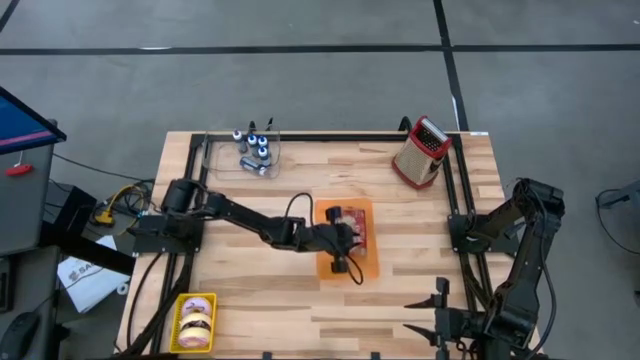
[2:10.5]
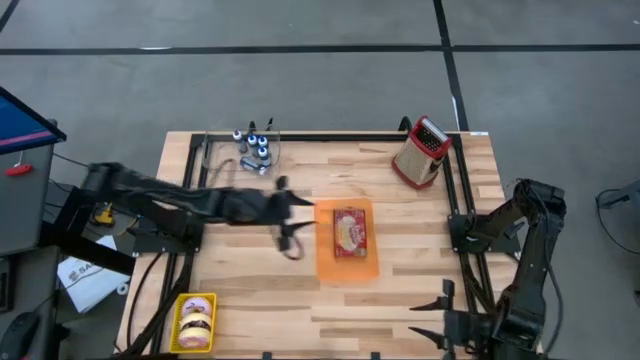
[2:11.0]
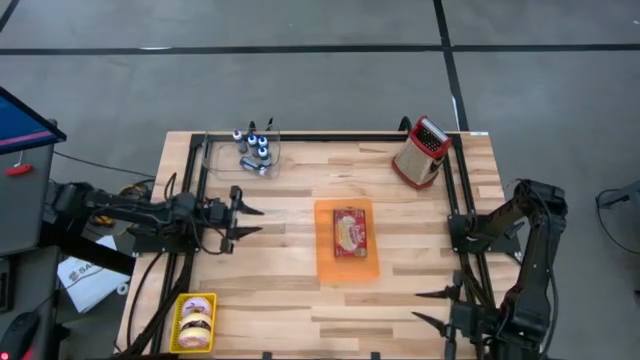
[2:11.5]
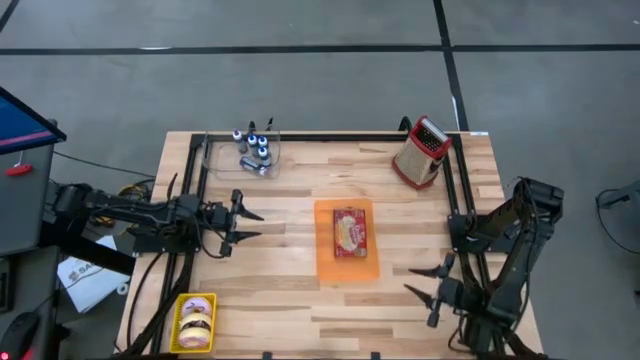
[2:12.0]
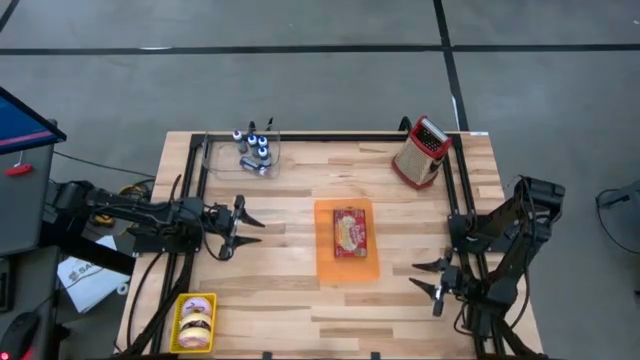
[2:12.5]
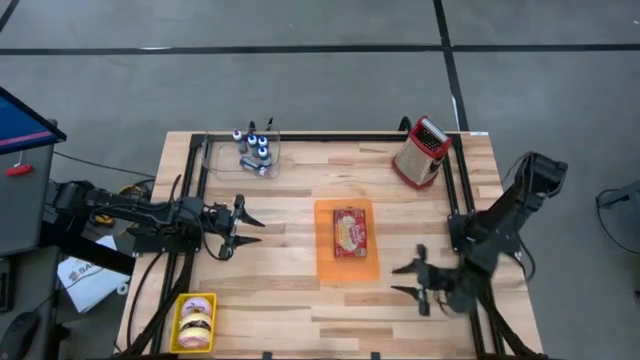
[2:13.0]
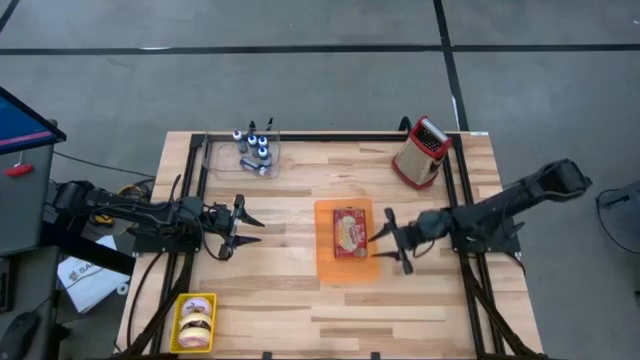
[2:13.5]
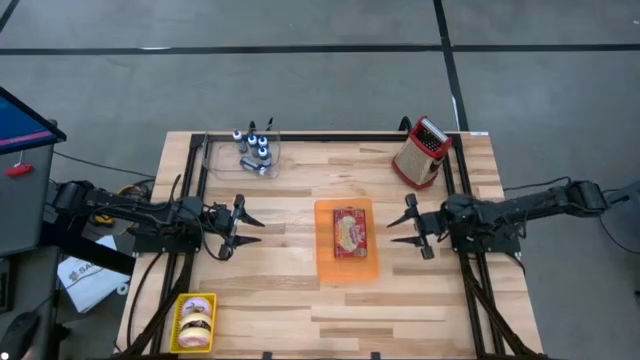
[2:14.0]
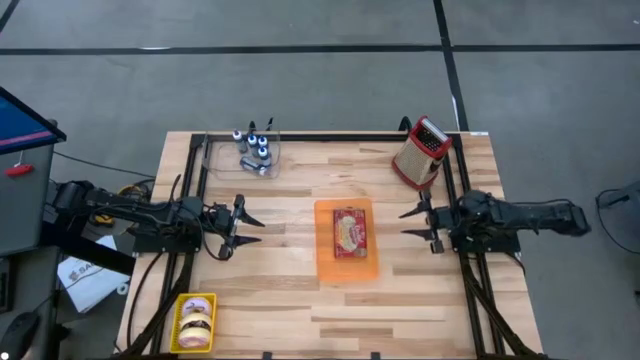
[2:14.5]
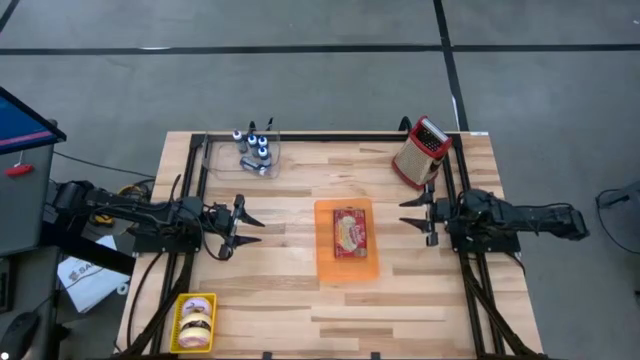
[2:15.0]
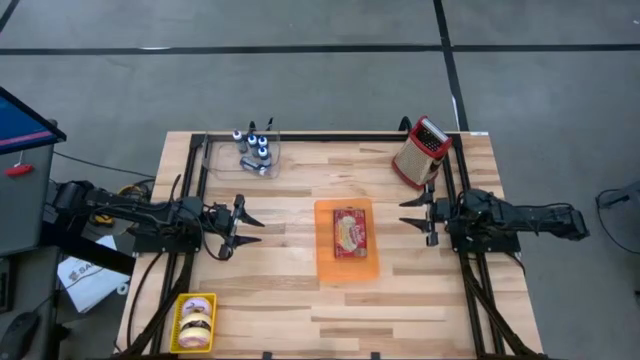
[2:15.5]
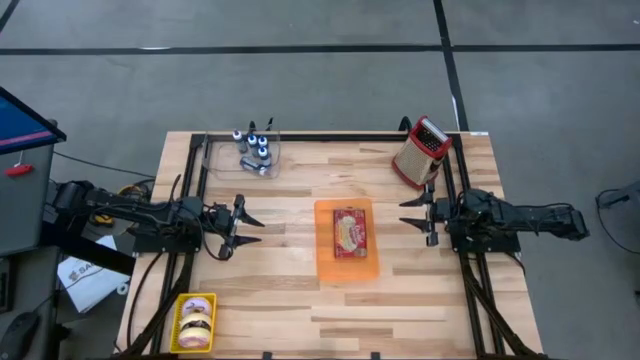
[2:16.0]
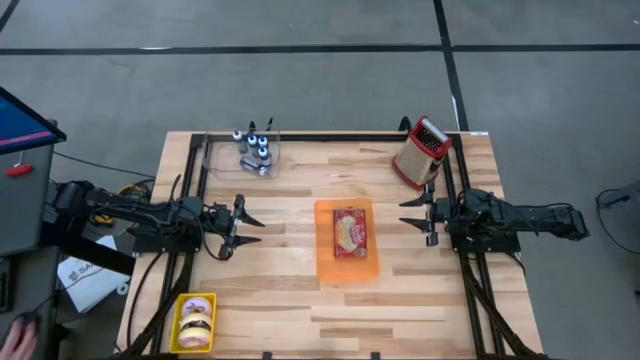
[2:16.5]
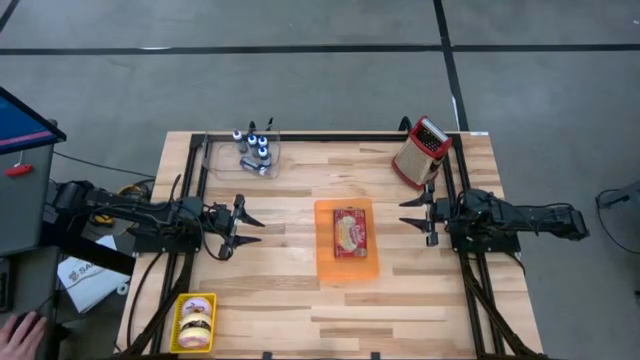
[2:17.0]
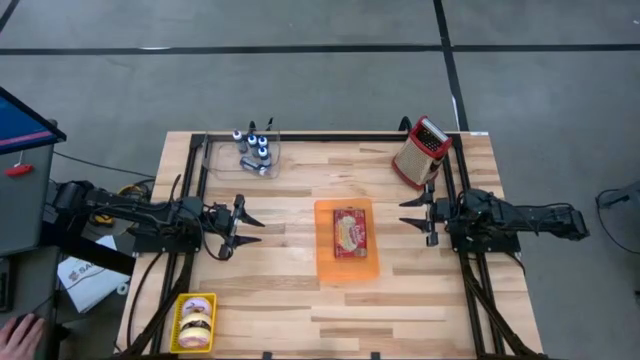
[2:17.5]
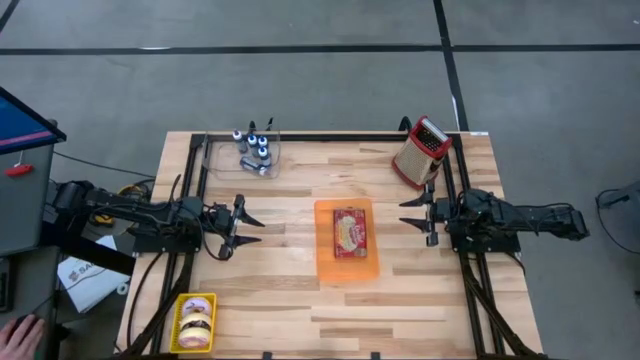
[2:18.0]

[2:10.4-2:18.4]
Task: Pick & Place Food Item
Return to Home Position

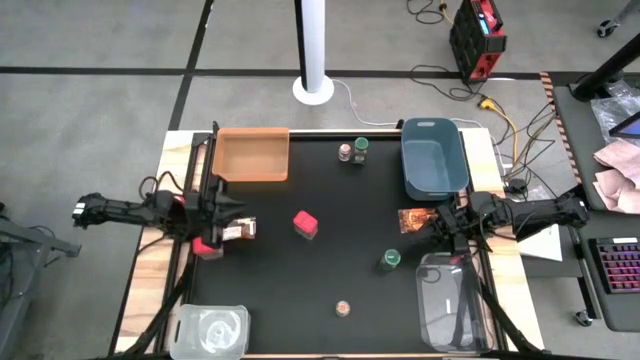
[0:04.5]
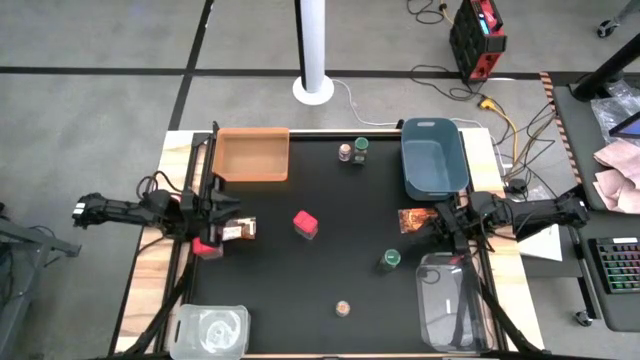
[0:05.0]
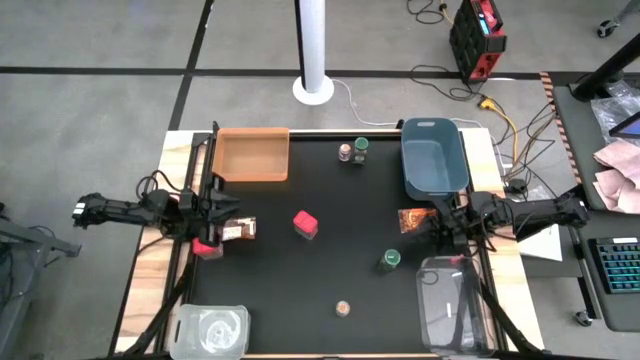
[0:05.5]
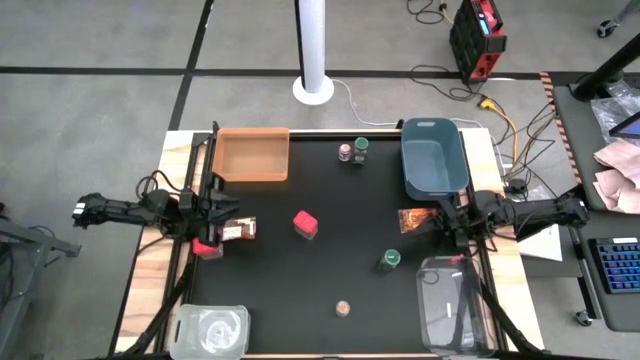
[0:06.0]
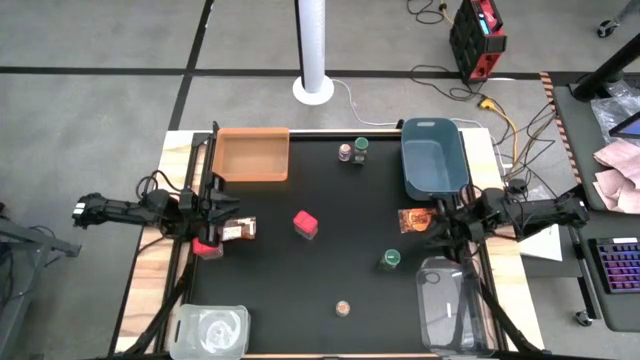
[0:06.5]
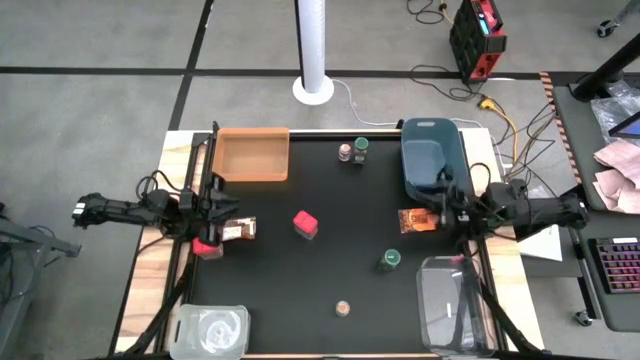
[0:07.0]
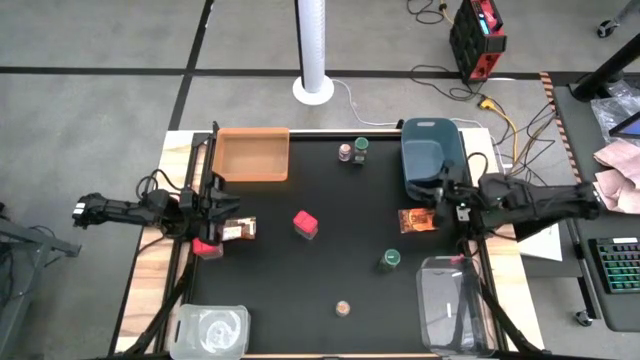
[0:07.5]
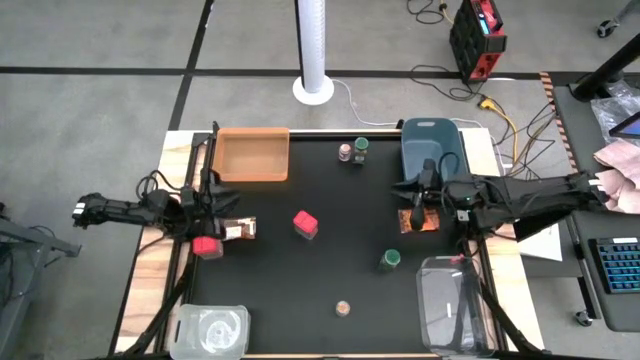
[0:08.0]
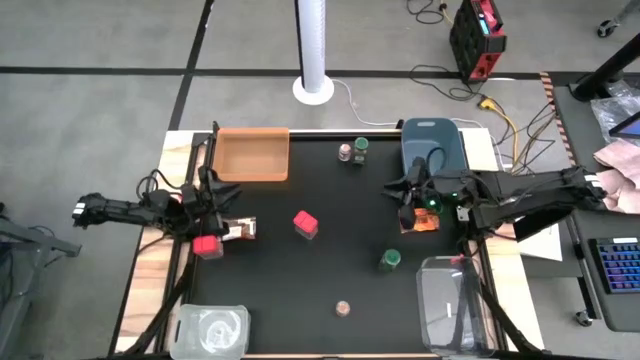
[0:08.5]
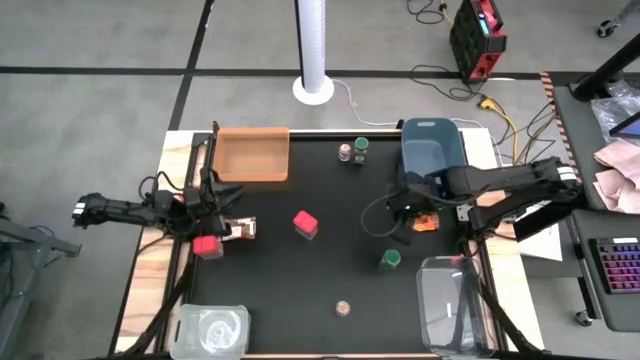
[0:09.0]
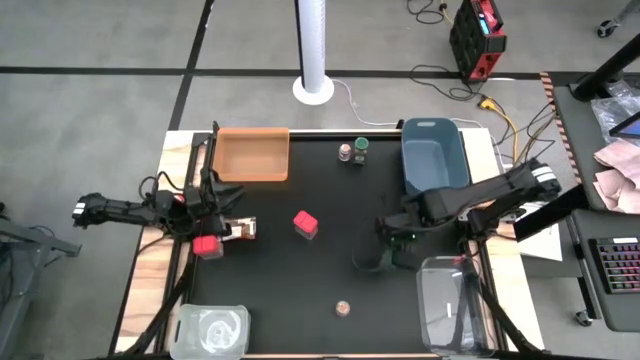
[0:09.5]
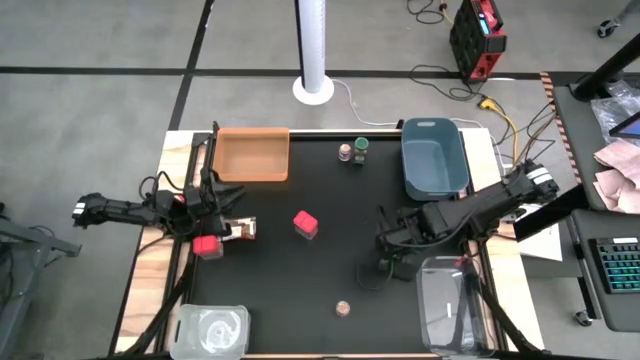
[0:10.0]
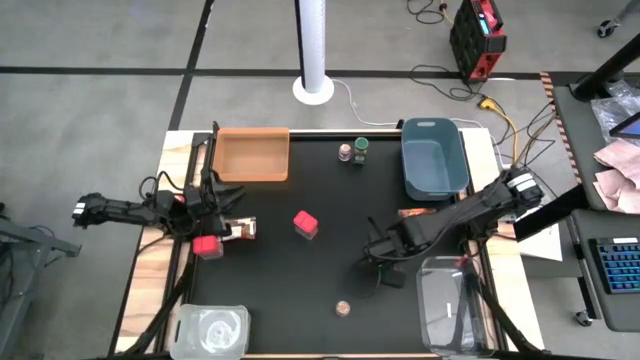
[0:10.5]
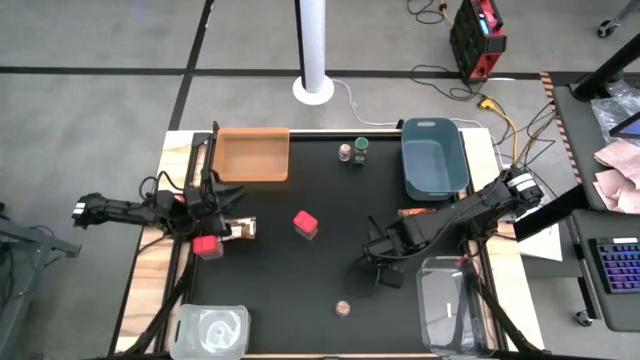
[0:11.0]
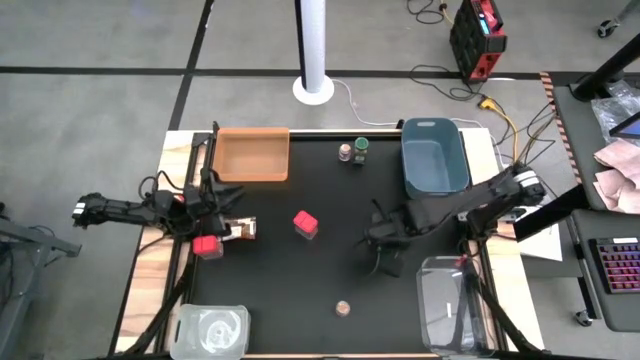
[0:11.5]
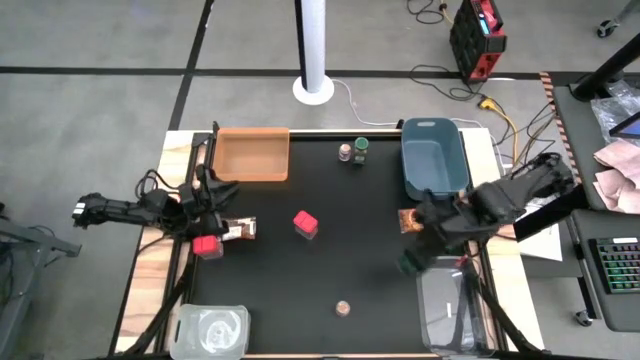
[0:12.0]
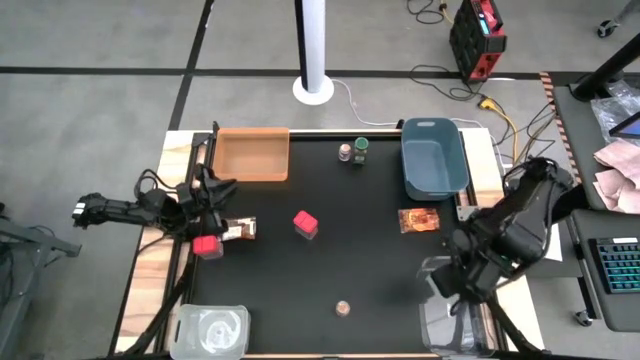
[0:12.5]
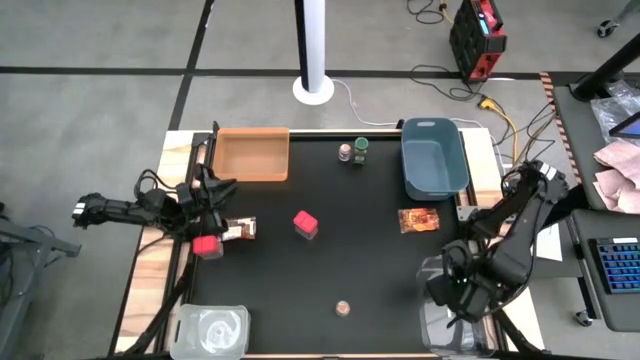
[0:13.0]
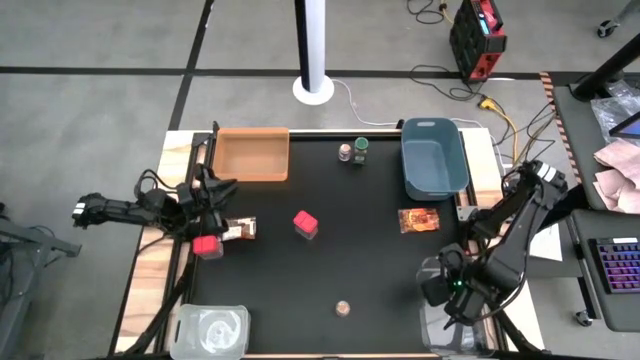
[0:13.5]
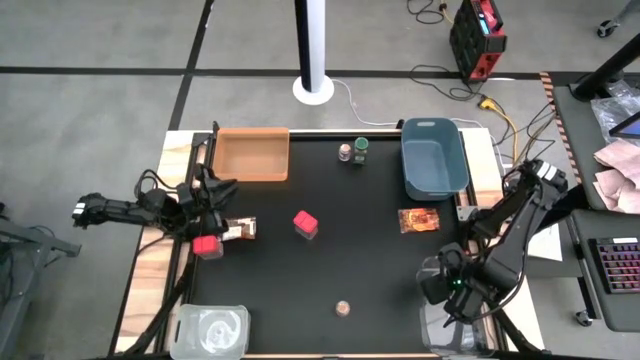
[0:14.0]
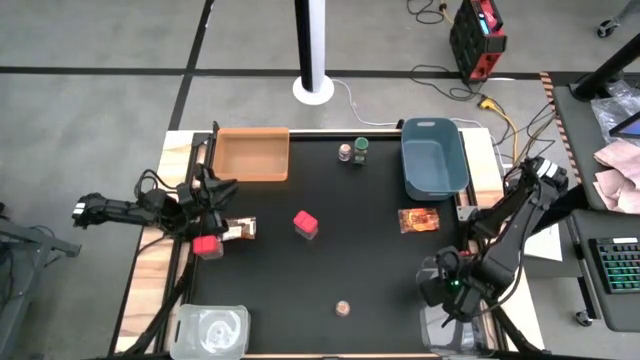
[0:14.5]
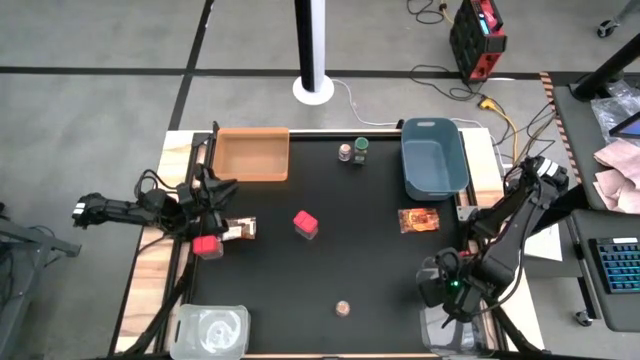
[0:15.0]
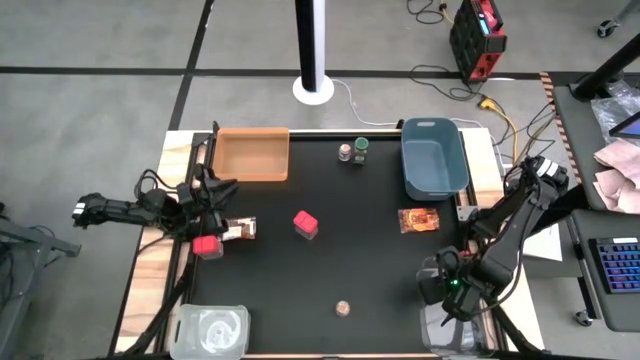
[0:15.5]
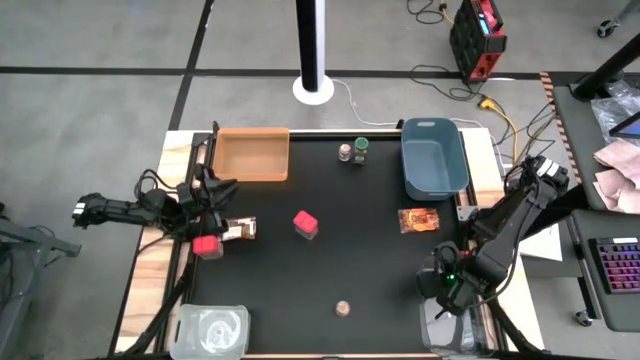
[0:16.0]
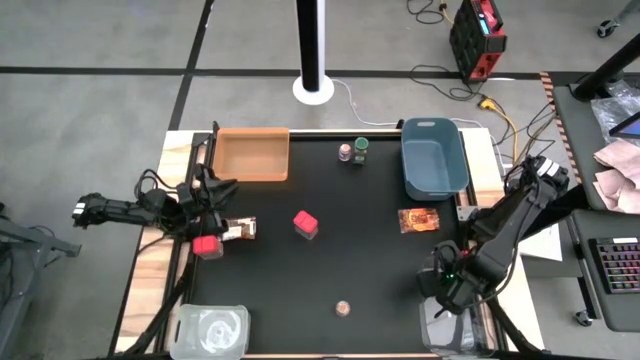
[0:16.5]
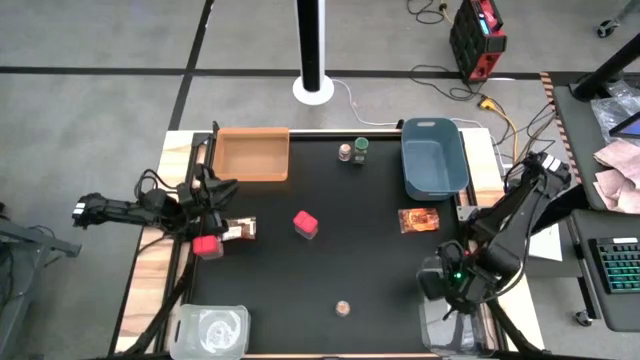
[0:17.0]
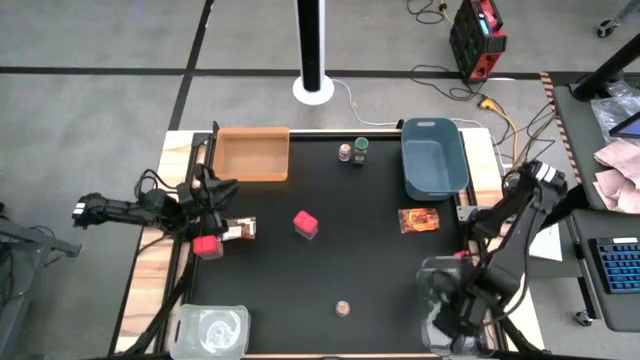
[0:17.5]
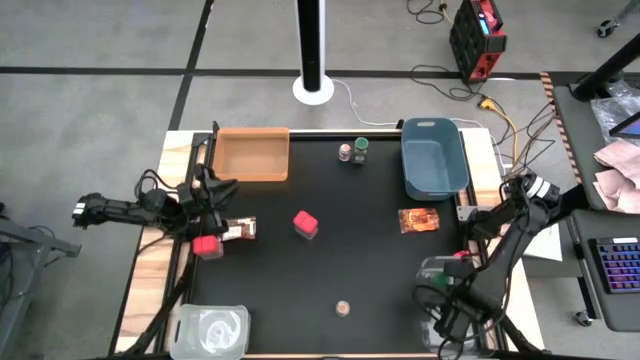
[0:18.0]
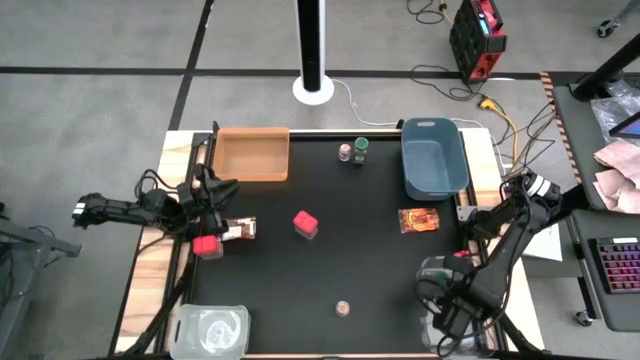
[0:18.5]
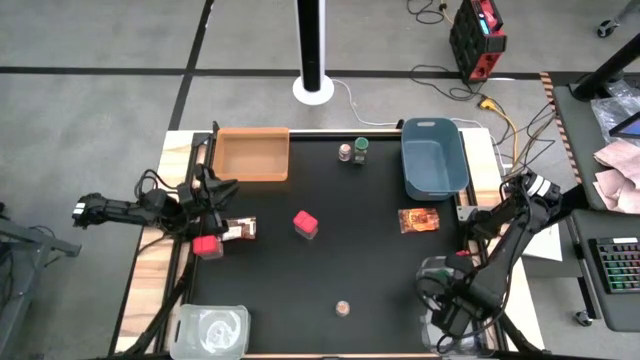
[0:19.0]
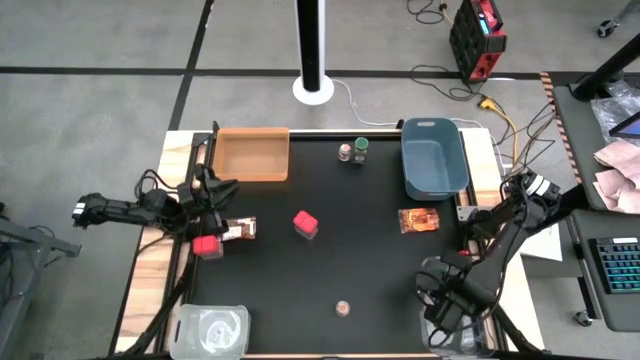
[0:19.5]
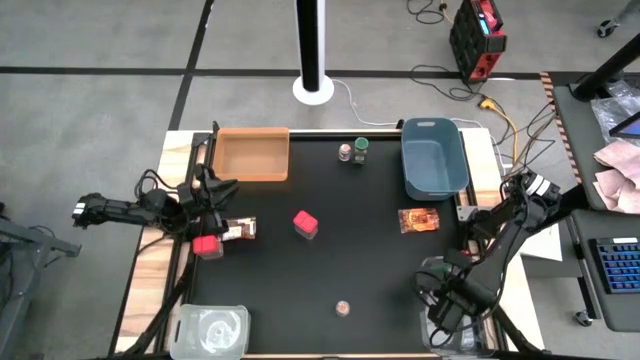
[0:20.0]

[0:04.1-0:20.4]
Task: Sort spices by type
Put the bottom green seasoning bottle into the transparent bin
